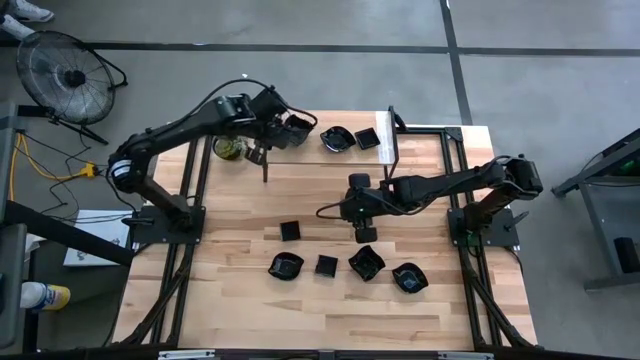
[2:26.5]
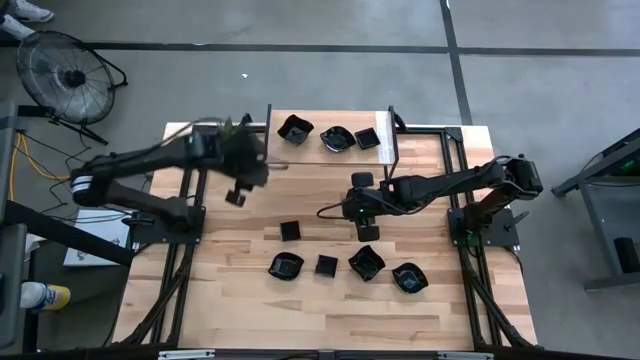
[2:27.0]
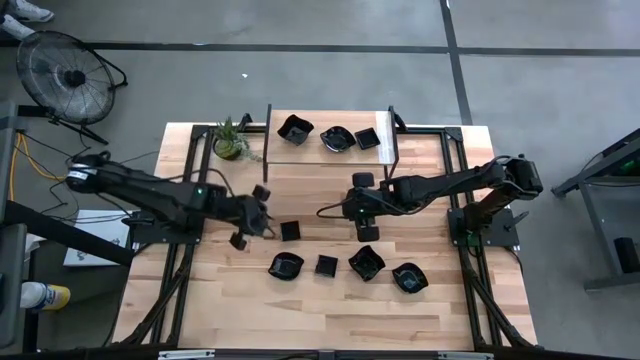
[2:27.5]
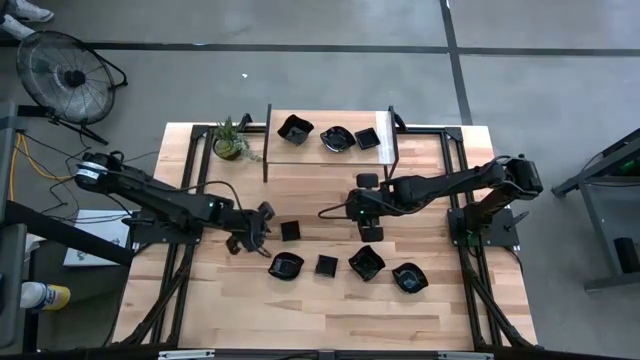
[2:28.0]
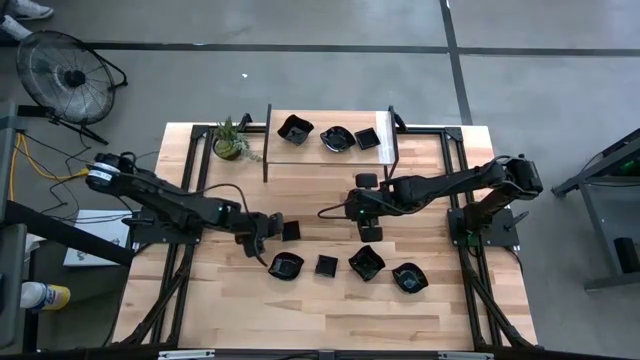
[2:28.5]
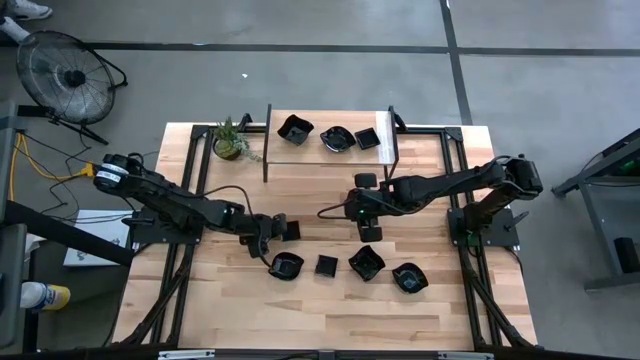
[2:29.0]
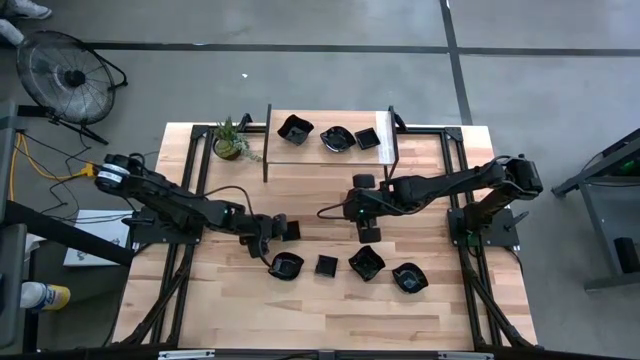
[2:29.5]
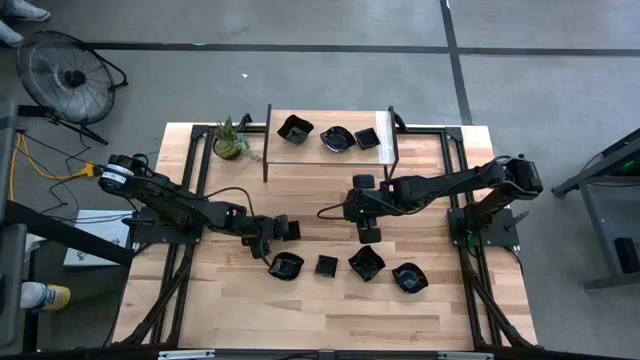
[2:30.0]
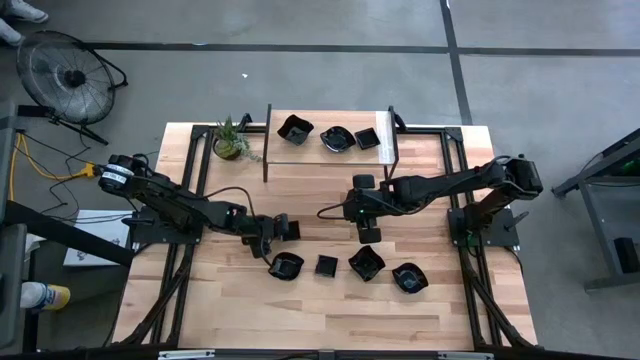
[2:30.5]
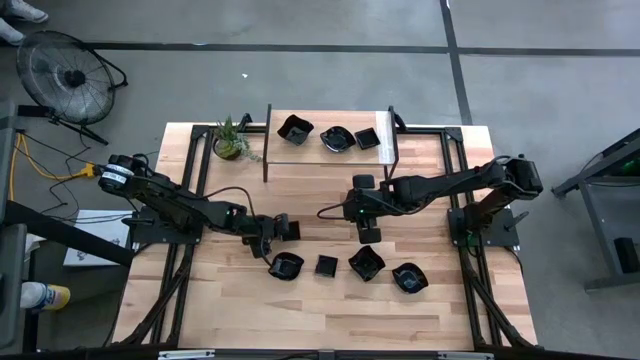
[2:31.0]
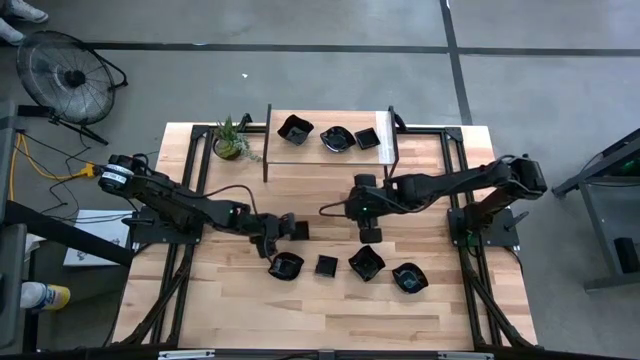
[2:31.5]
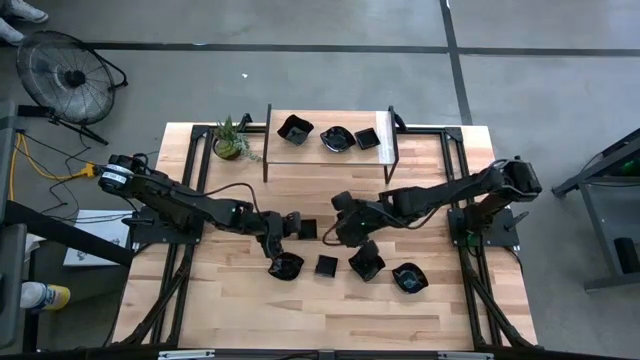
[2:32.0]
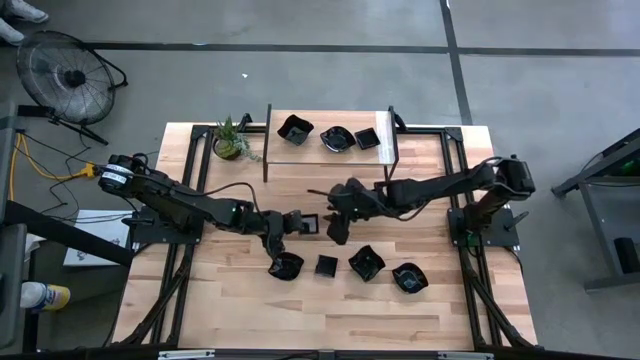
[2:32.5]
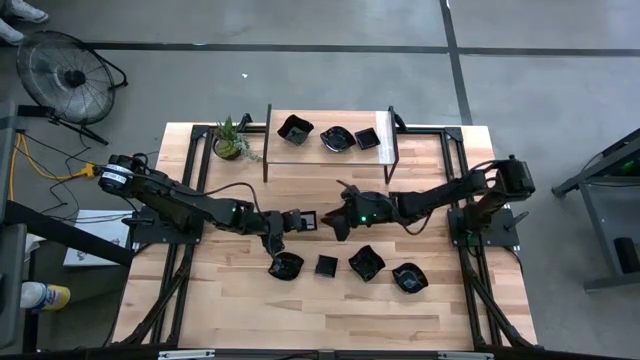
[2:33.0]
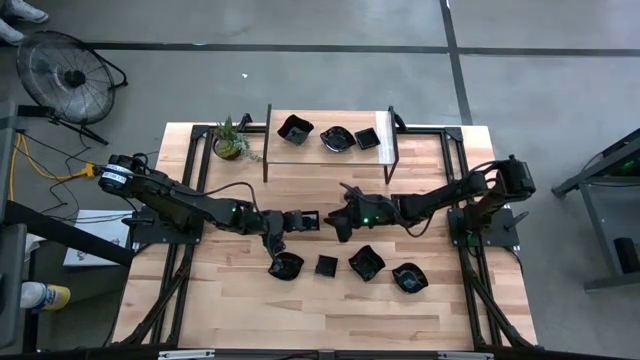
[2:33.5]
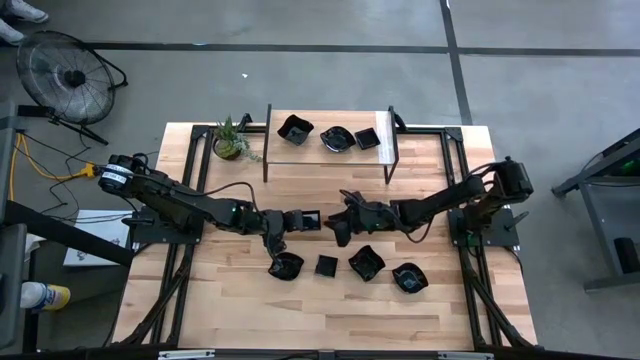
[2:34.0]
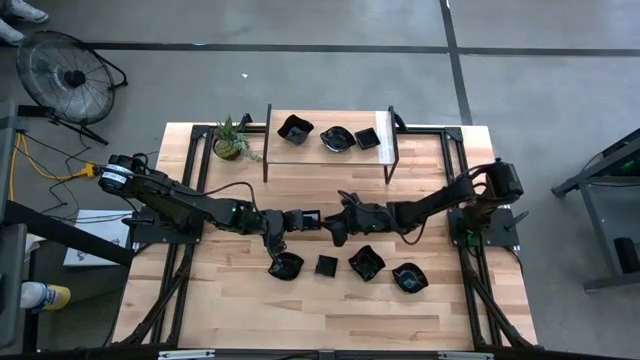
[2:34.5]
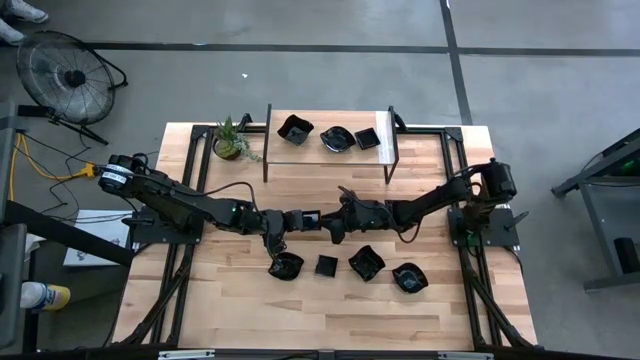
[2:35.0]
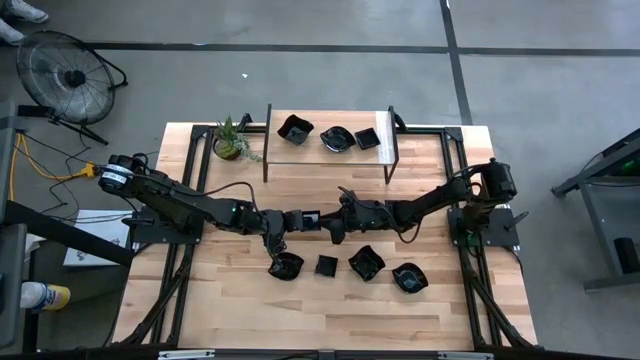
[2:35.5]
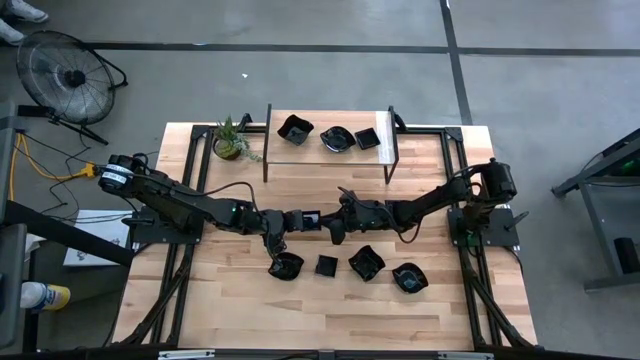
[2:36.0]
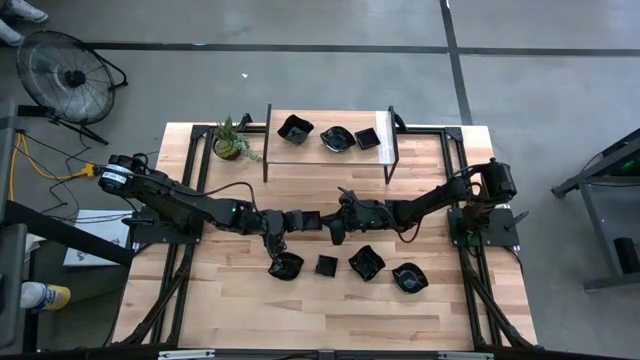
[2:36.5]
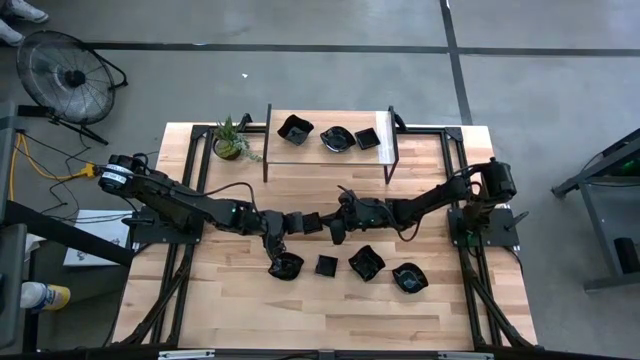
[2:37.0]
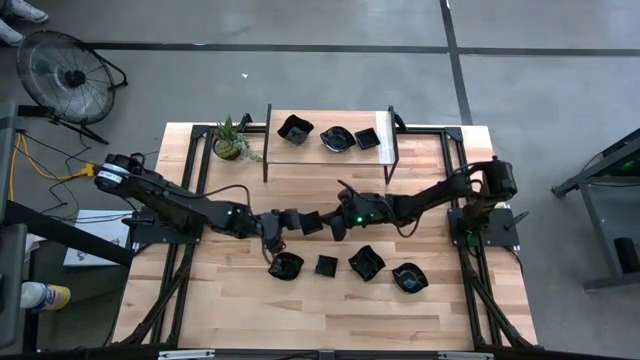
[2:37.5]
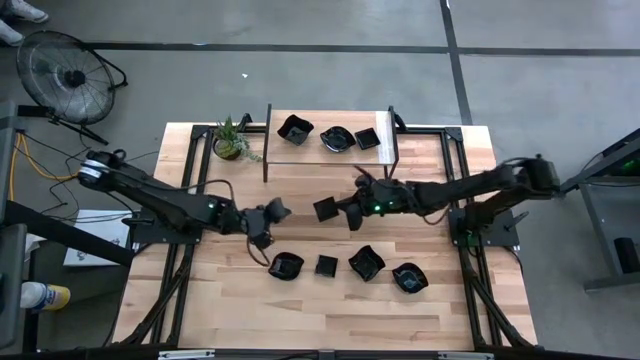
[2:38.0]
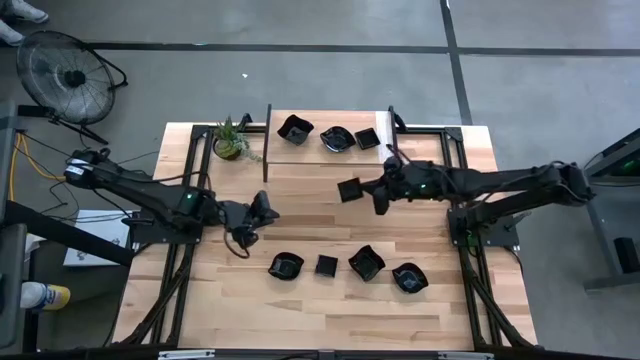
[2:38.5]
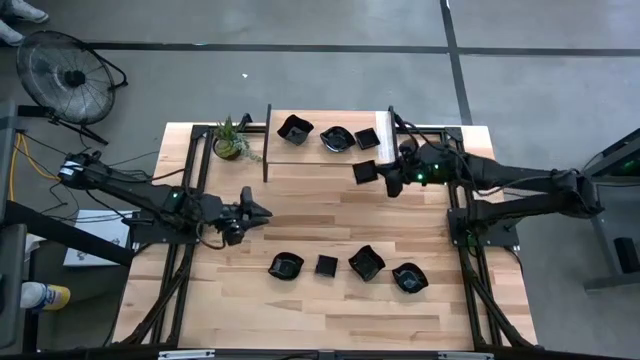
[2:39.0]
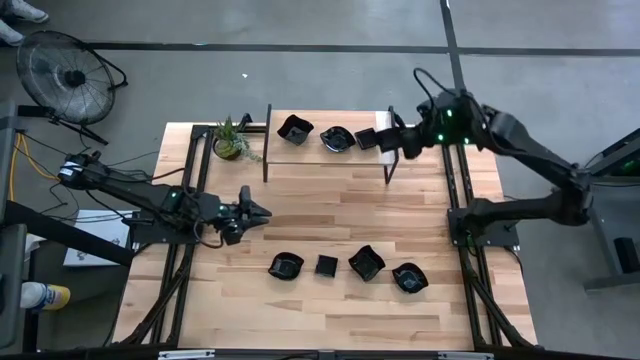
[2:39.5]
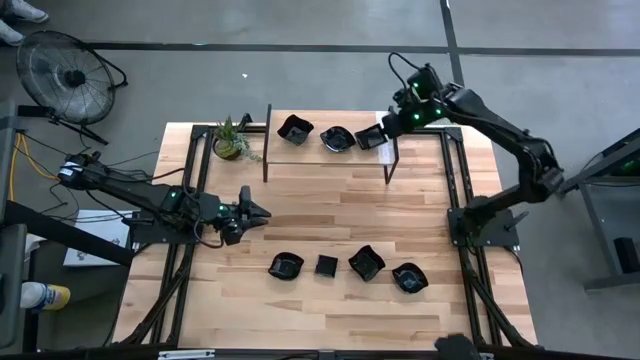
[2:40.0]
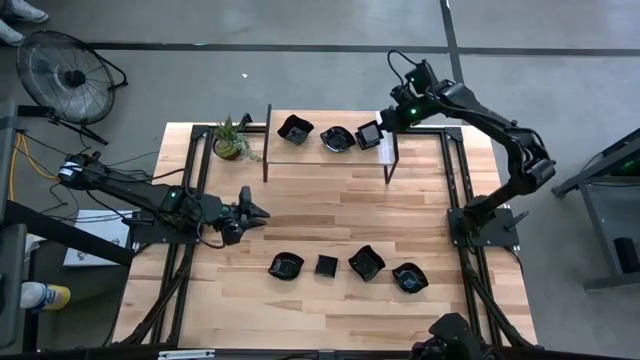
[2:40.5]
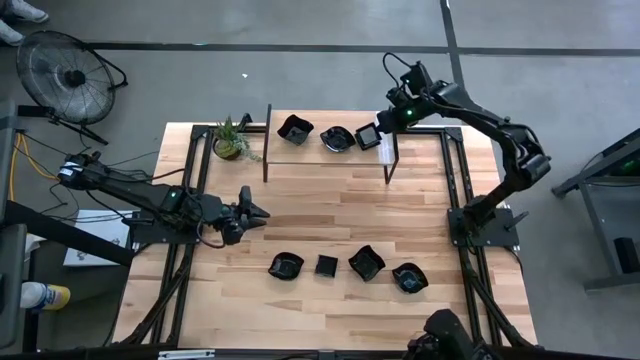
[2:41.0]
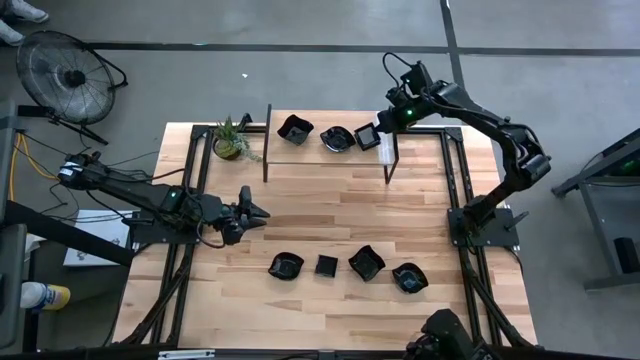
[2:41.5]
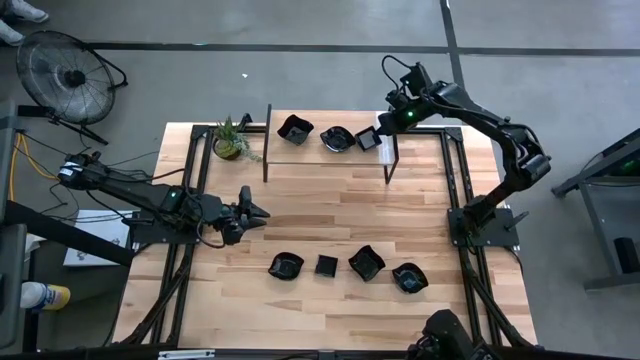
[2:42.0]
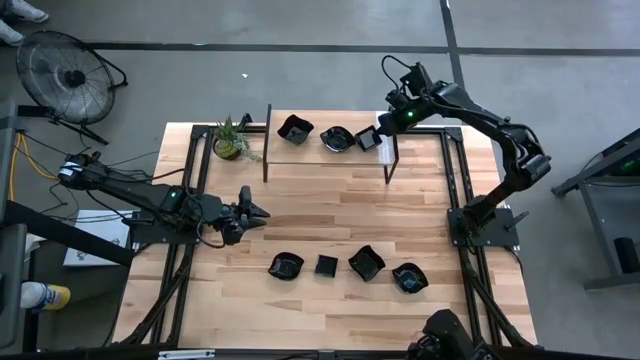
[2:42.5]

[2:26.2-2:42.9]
Task: Pick & Place Mini shaped plates
Stack the black square plate on top of the black square plate on the shelf

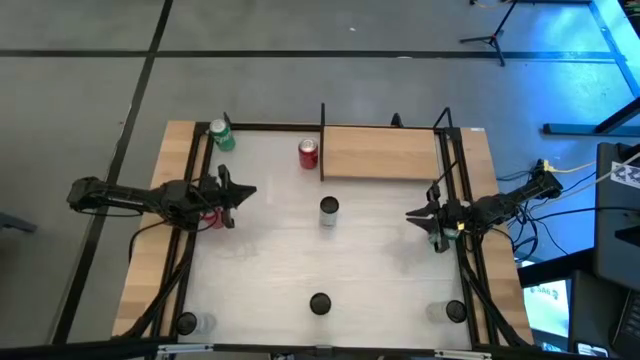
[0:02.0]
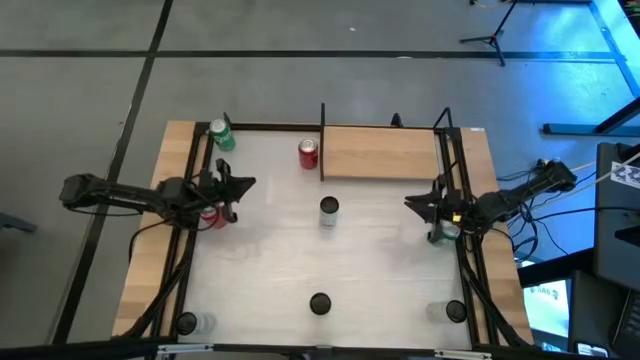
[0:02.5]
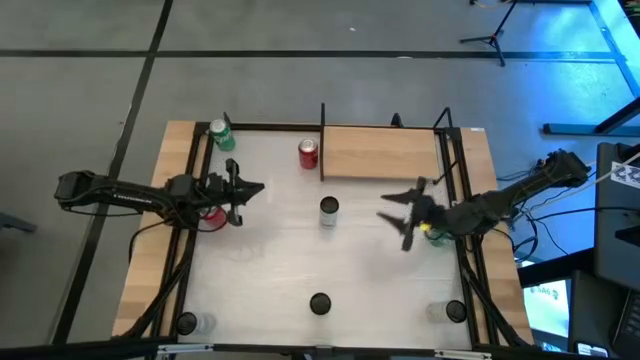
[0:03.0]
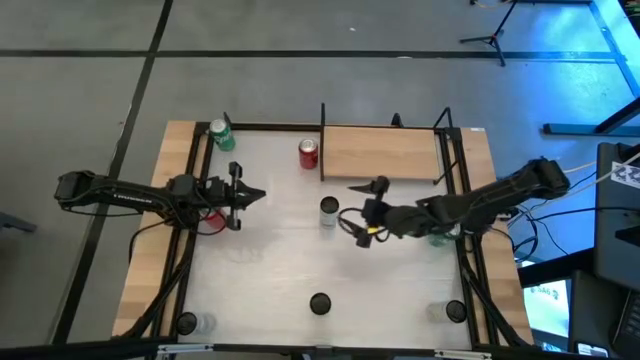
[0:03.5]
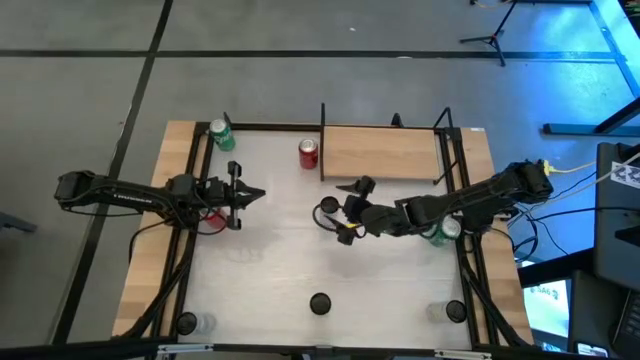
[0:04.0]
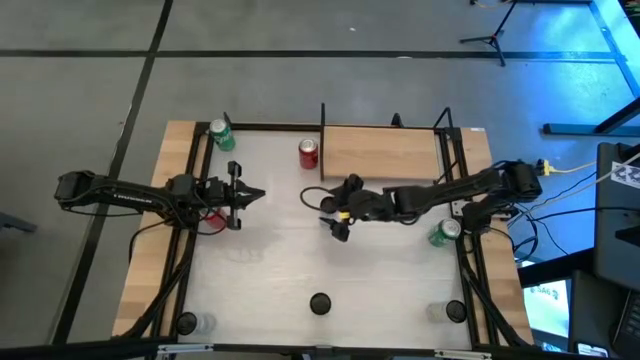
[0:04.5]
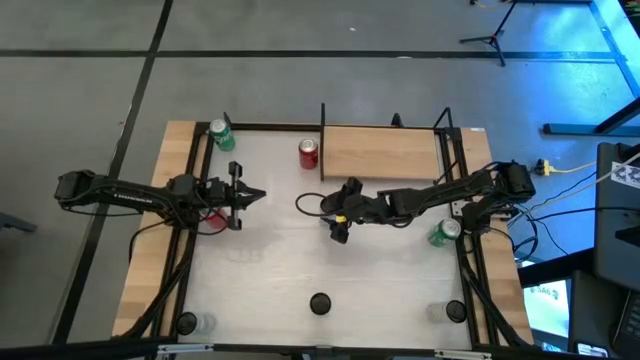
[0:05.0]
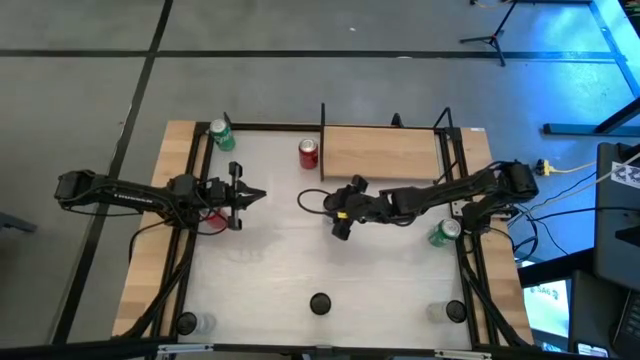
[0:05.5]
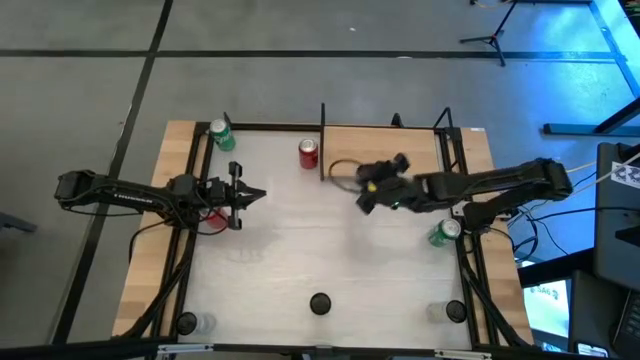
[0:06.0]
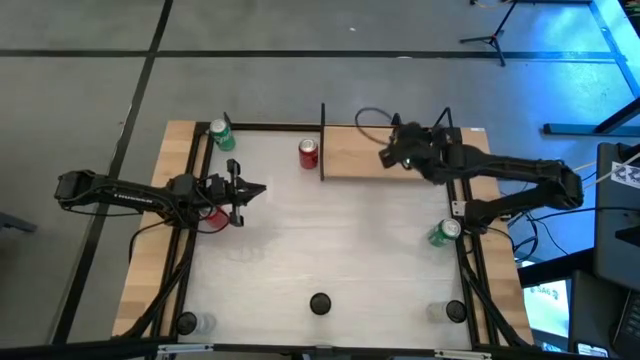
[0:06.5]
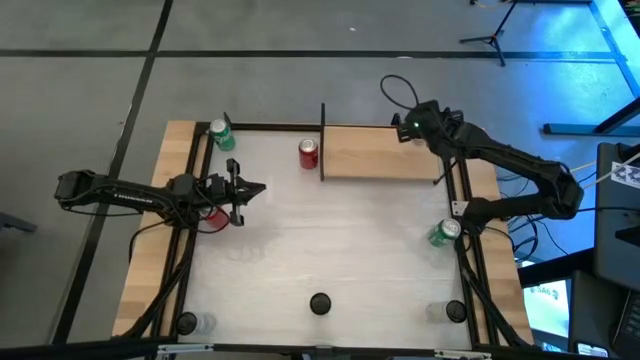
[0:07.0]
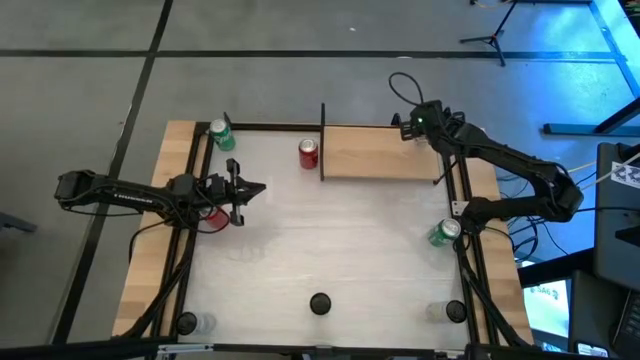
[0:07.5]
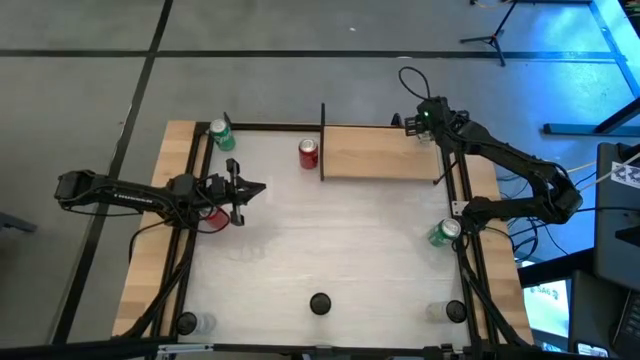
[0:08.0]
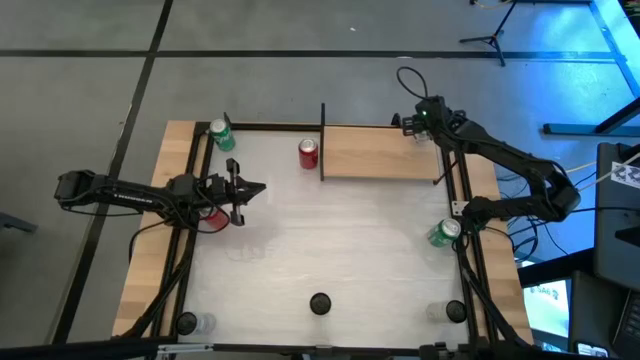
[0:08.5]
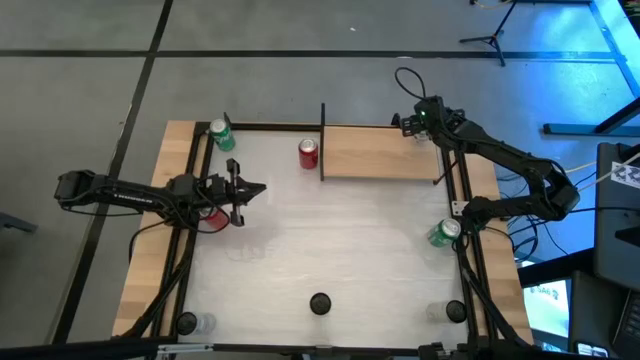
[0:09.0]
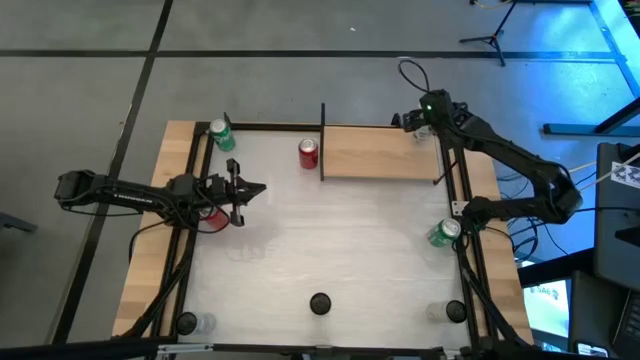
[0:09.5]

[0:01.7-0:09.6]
Task: Place canned beverage on shelf
Put the right white blue soda can on the shelf
